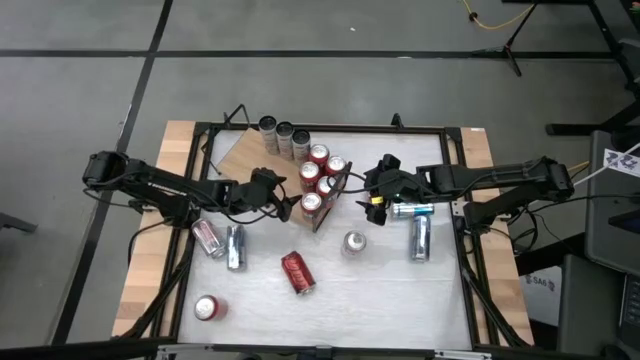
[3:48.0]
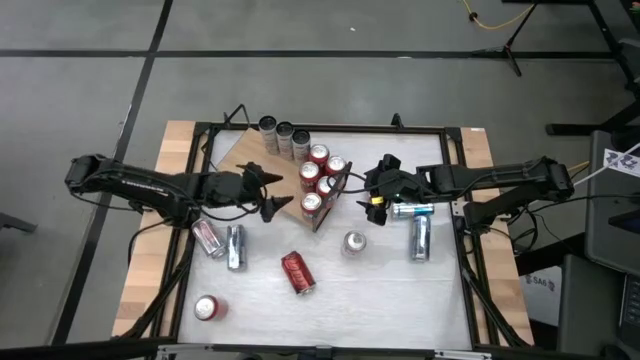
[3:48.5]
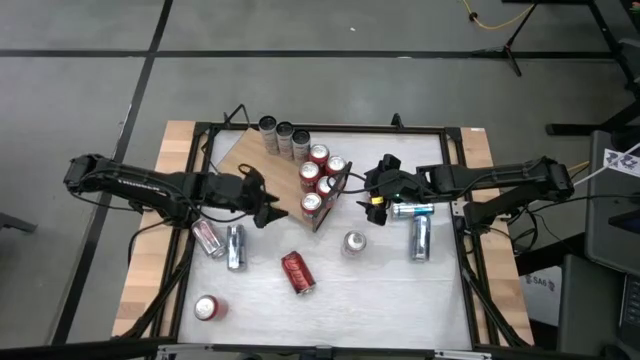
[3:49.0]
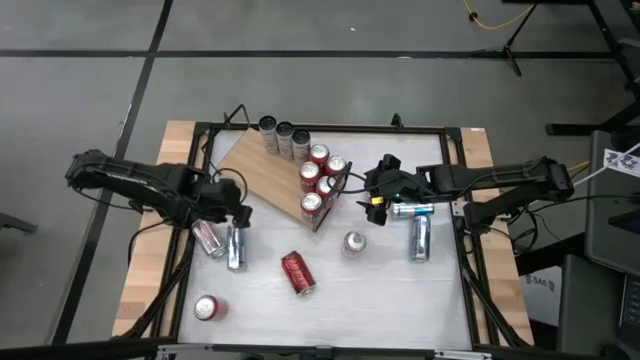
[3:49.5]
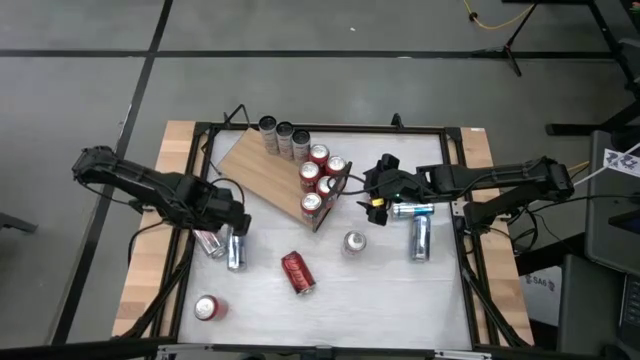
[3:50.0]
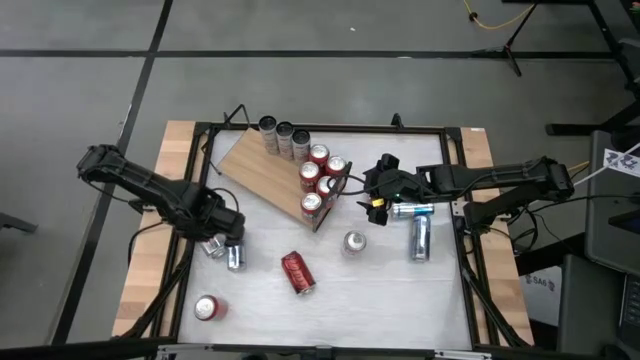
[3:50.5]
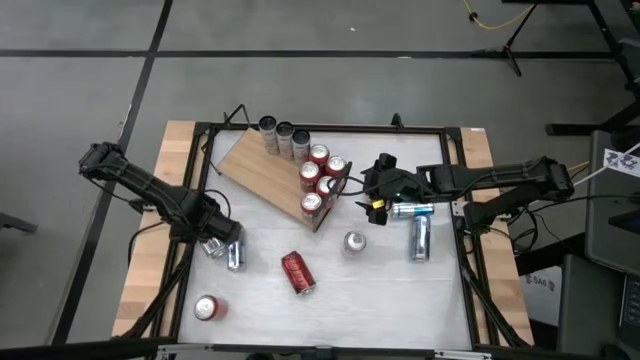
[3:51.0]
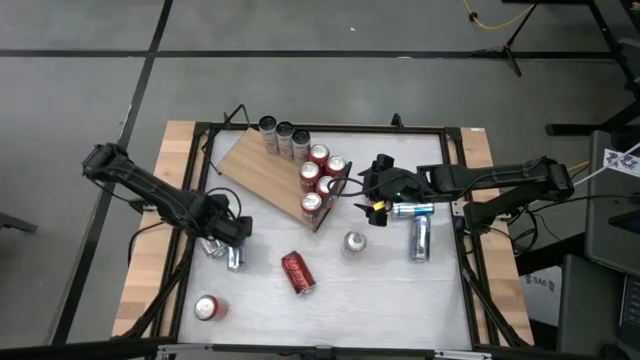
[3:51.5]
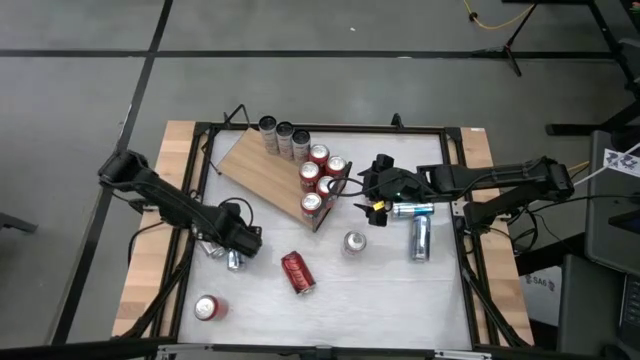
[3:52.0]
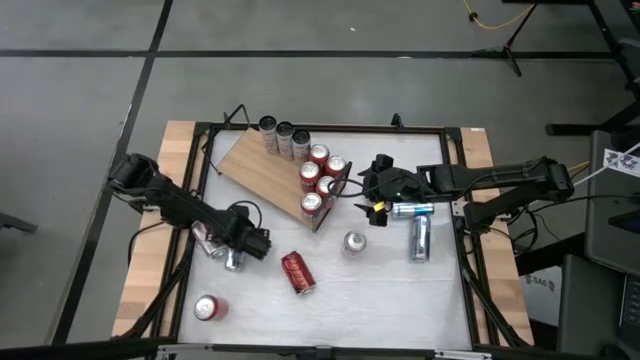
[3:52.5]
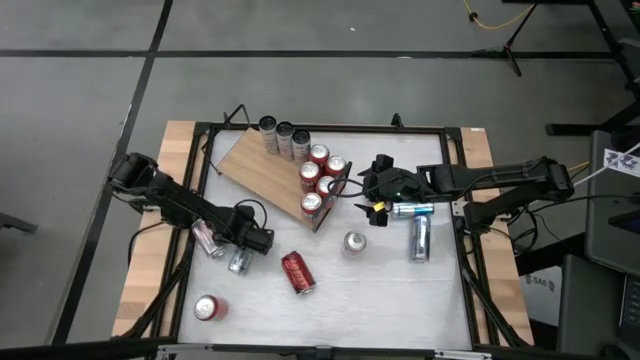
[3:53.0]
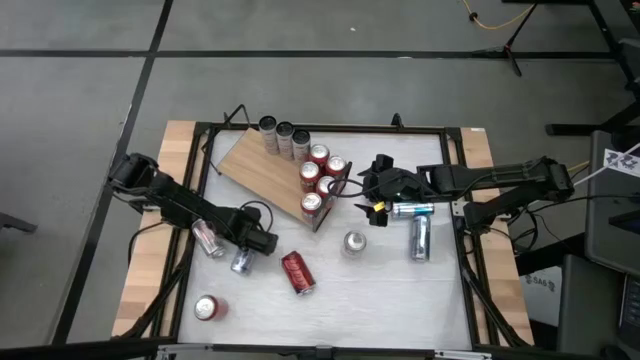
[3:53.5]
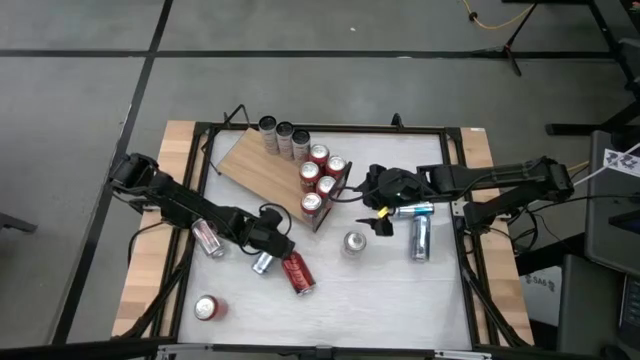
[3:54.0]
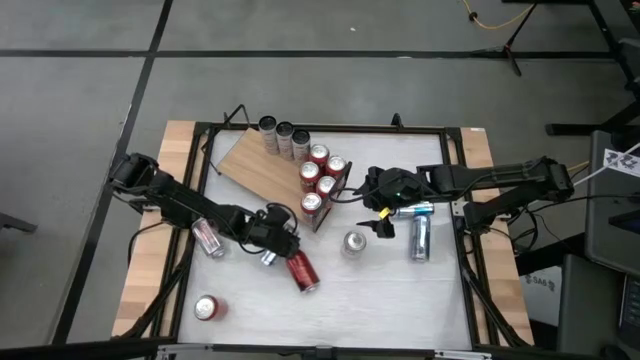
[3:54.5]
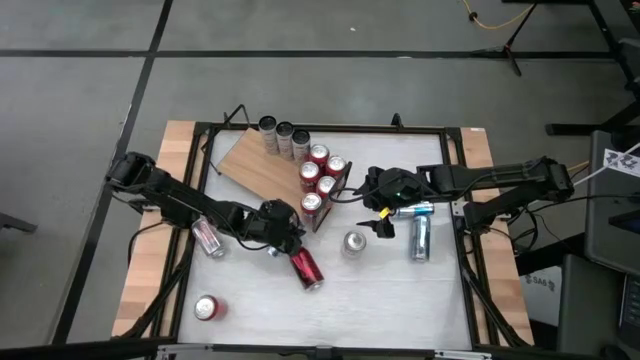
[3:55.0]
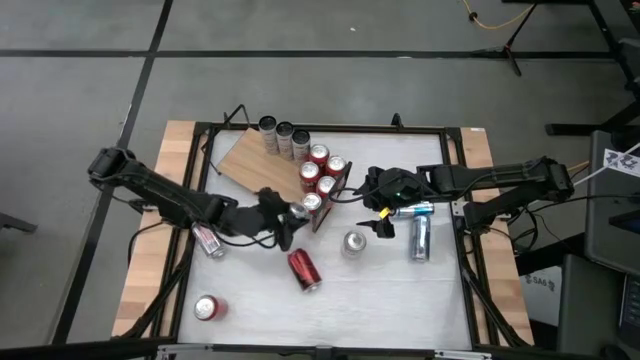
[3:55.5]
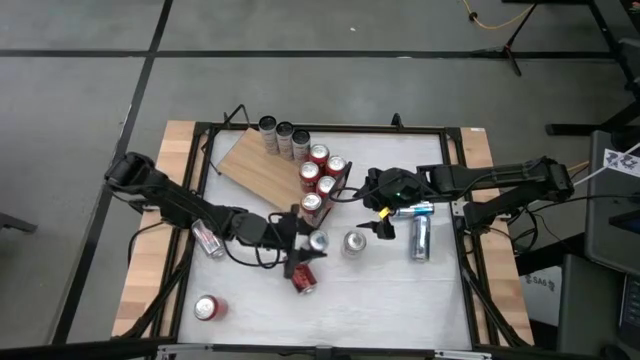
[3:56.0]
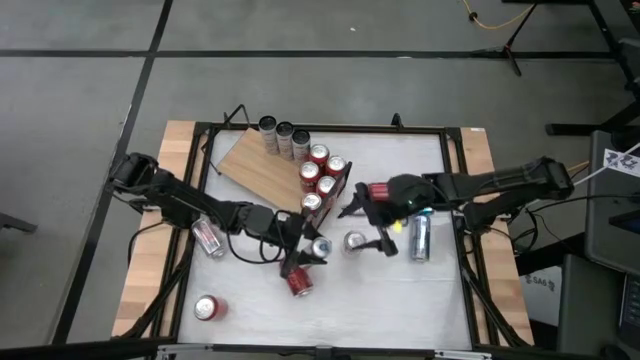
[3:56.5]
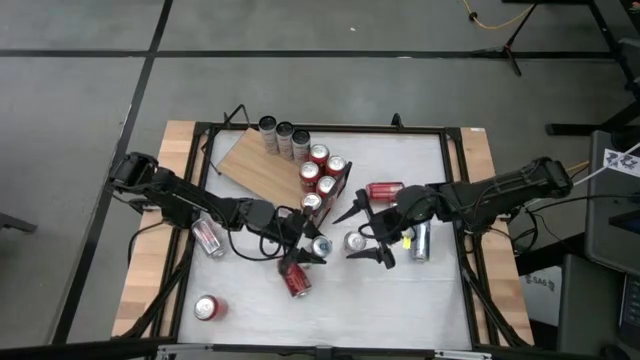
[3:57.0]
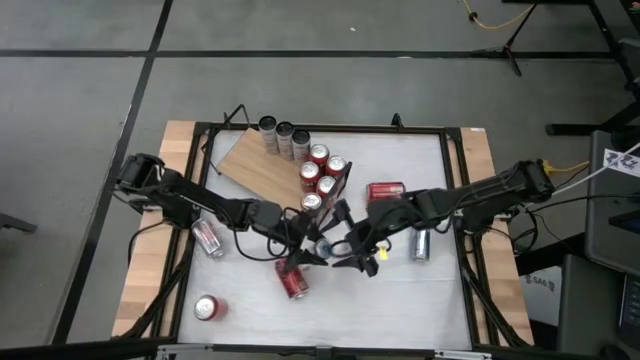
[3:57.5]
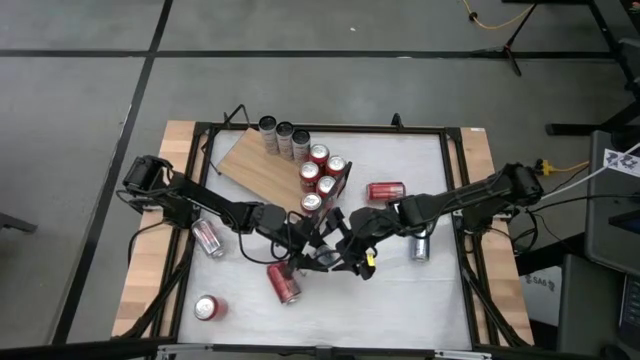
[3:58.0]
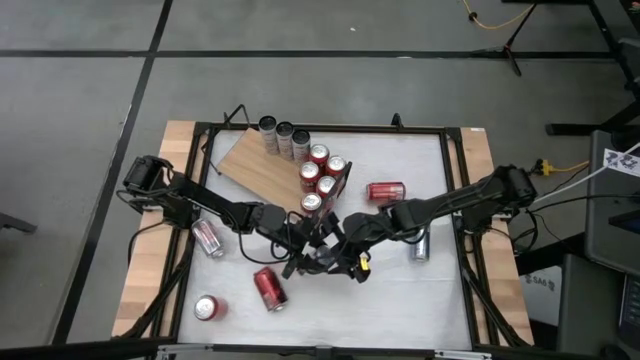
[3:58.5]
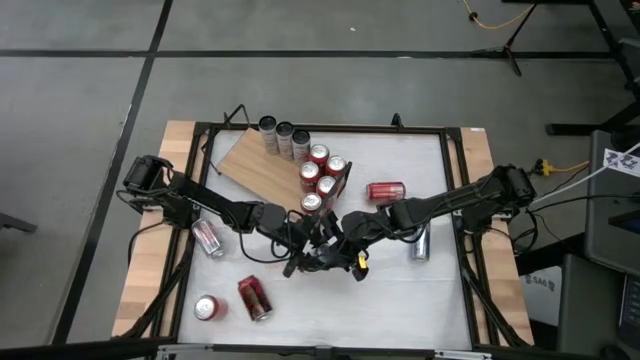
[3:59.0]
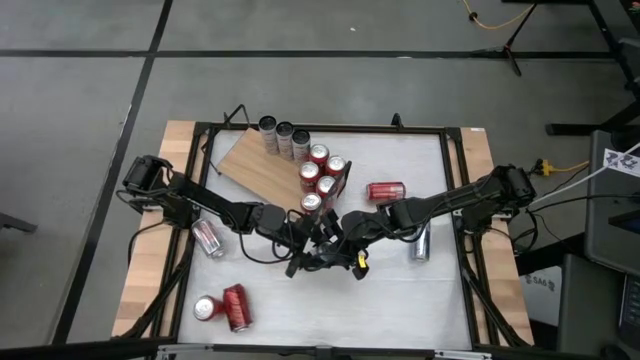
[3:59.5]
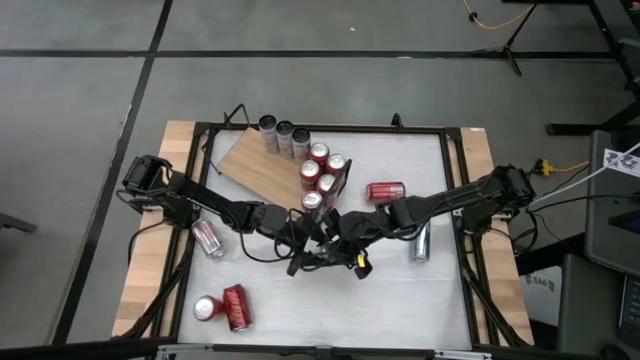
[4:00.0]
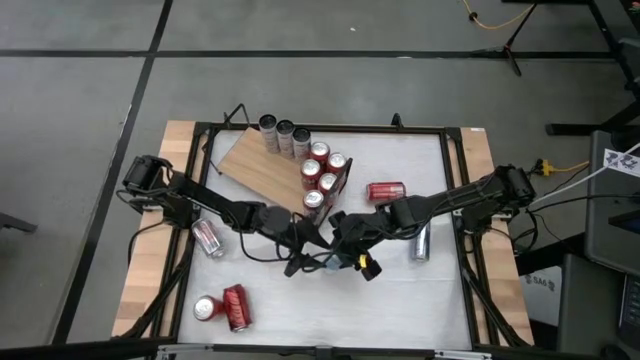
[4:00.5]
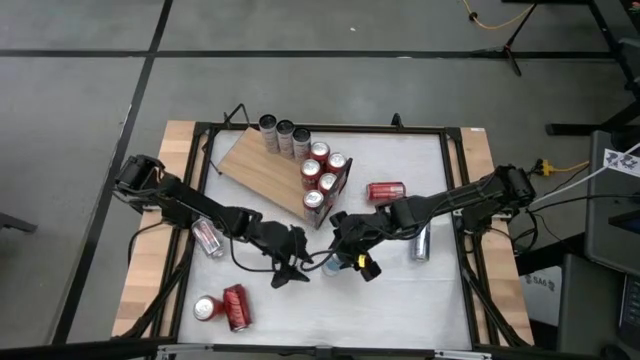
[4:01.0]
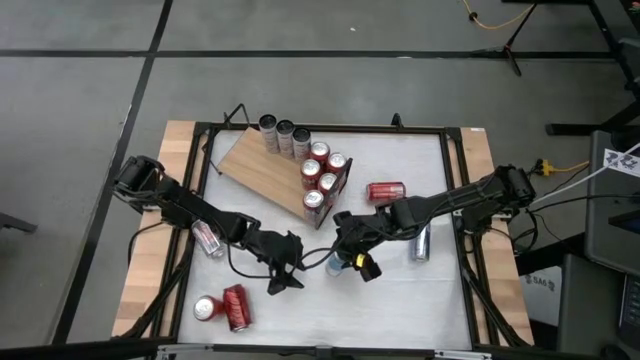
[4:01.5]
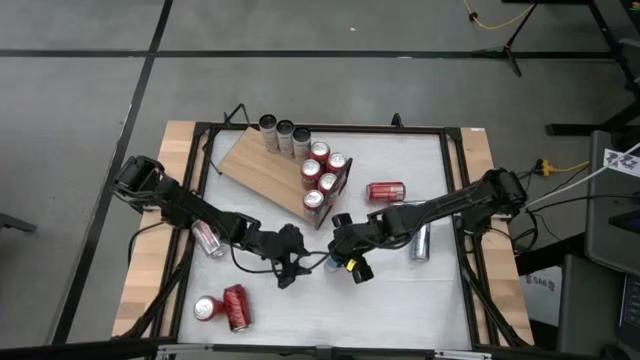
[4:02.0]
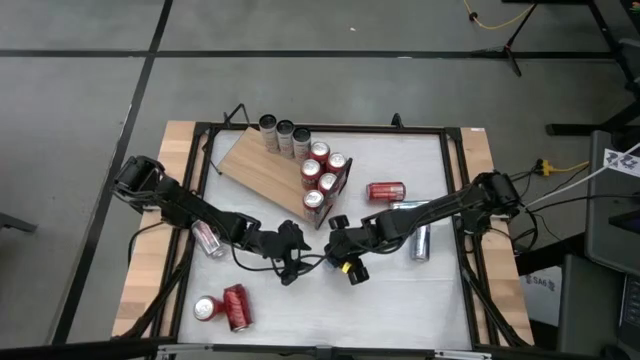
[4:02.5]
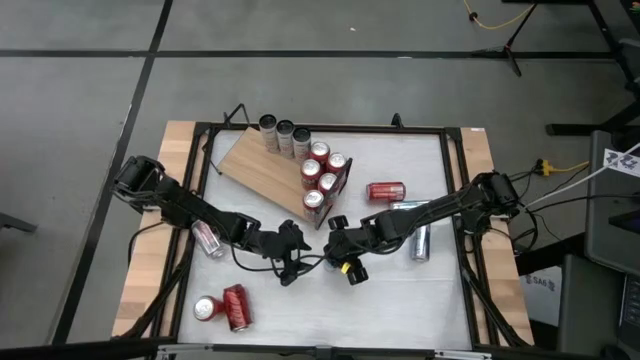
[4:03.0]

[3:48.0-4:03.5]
Task: Pick and place cans onto a shelf
Put the bottom left blue/white soda can on the shelf

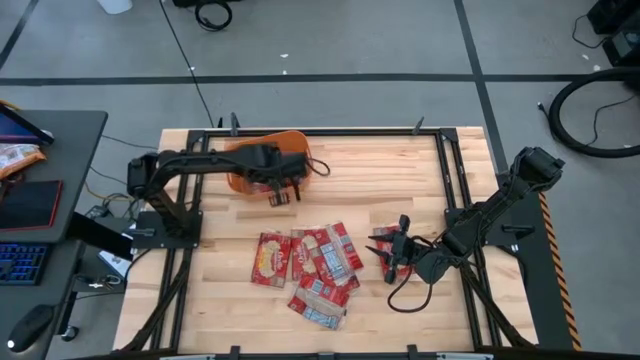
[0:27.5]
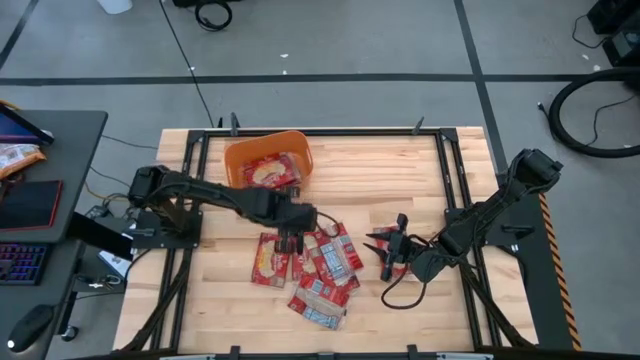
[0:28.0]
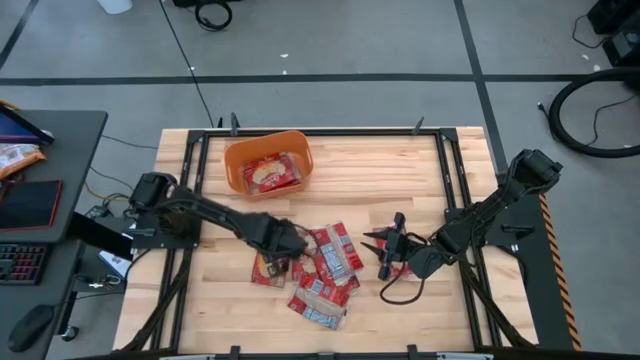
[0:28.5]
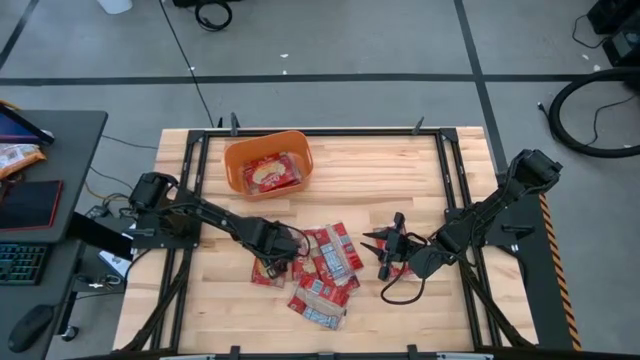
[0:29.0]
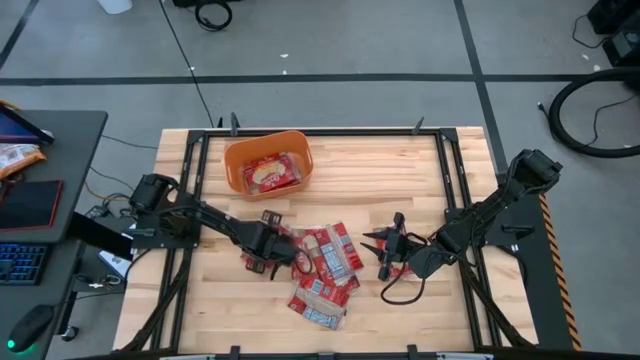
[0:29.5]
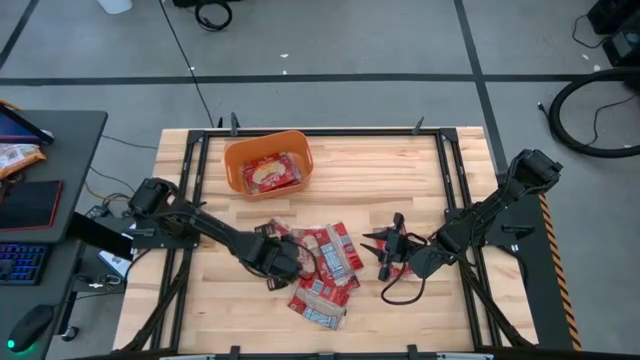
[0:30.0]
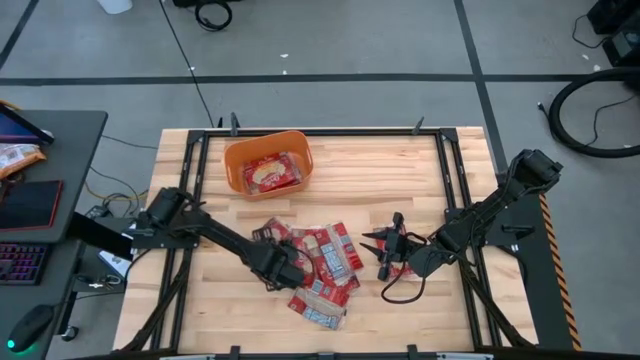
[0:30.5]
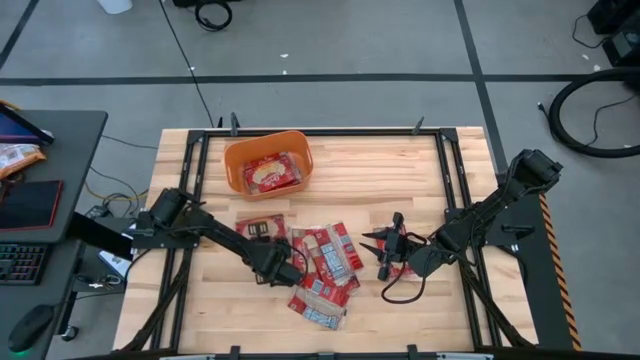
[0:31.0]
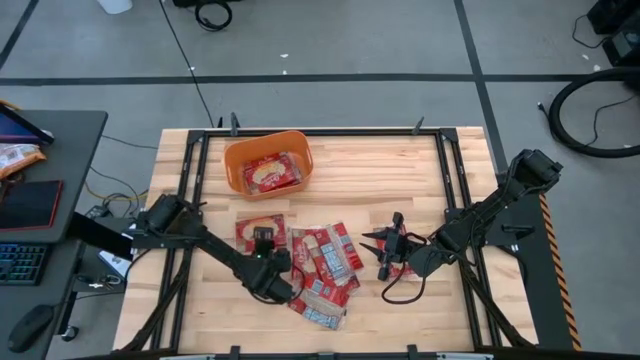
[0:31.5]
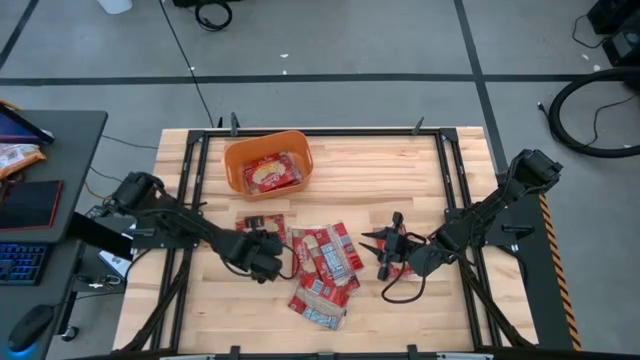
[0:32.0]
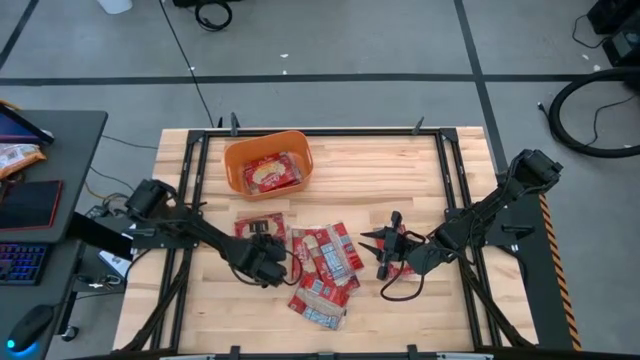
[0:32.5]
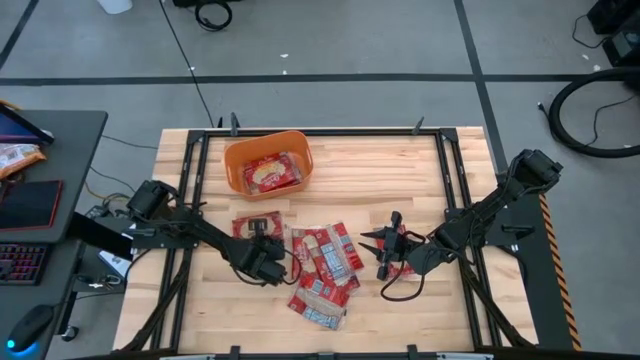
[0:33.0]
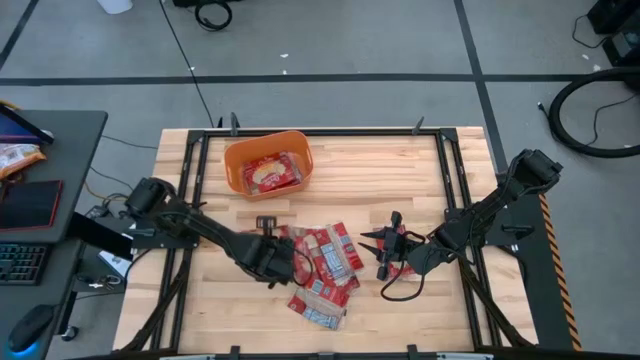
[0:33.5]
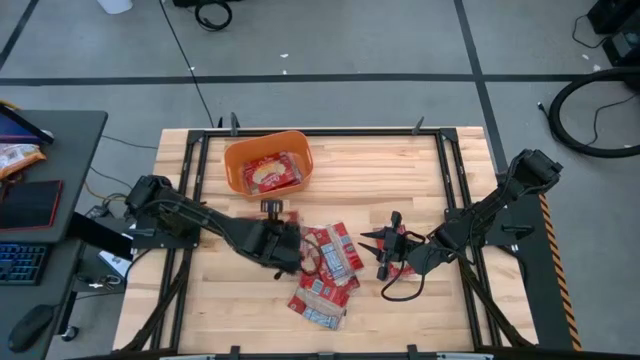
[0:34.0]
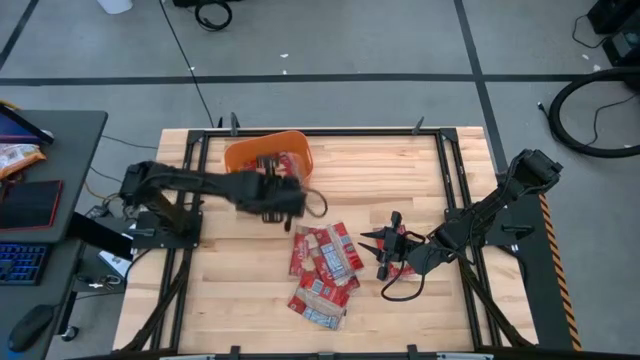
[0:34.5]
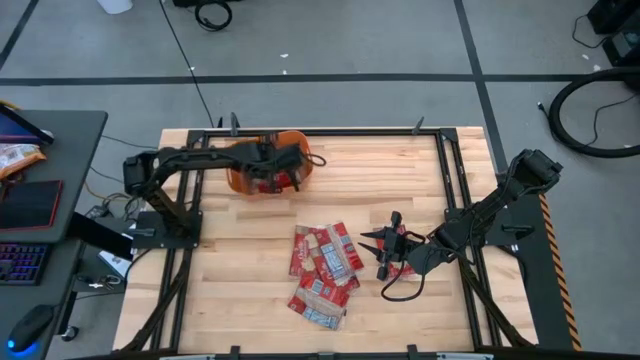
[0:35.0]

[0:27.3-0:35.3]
Task: Sort popcorn bags into baskets
Put the red popcorn bag into the orange bin
